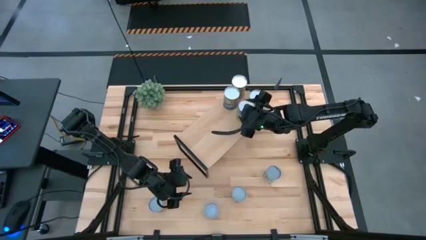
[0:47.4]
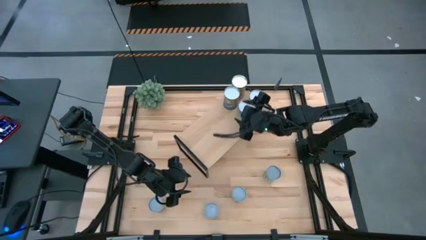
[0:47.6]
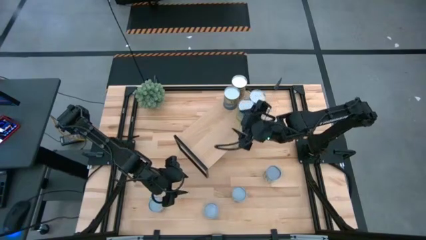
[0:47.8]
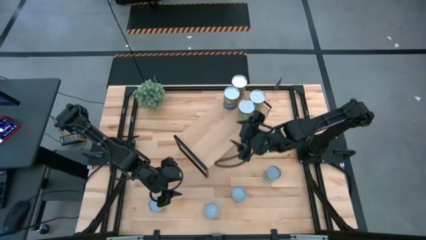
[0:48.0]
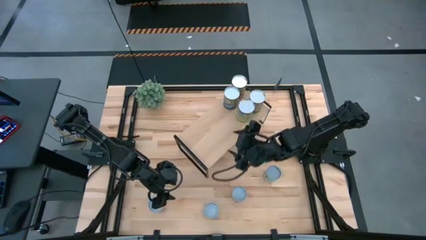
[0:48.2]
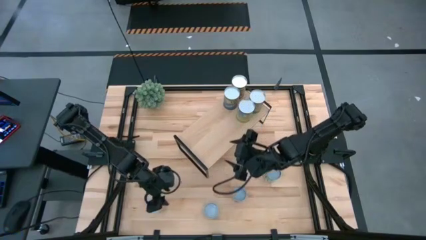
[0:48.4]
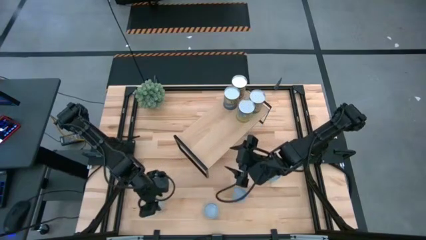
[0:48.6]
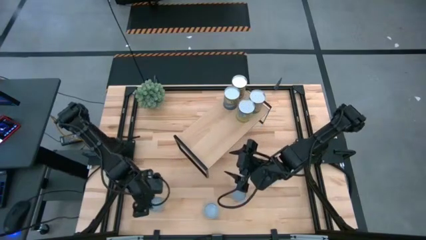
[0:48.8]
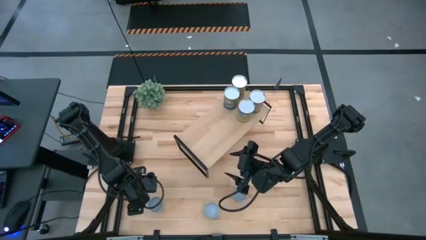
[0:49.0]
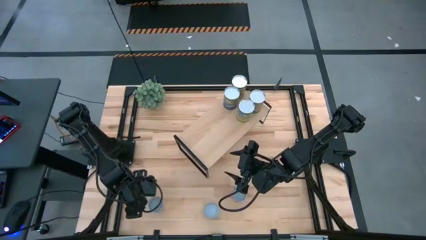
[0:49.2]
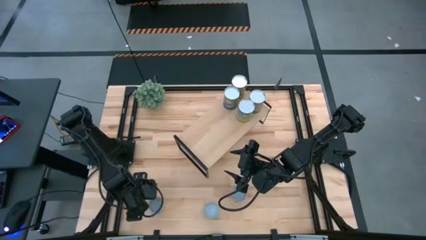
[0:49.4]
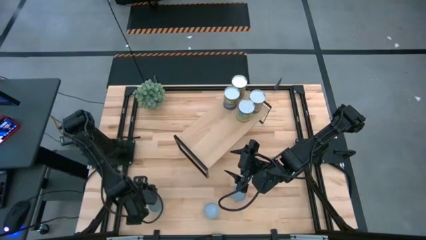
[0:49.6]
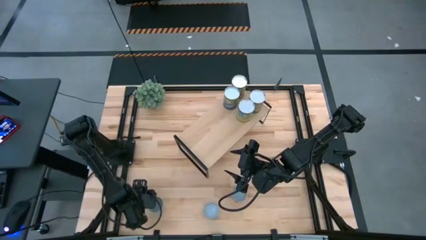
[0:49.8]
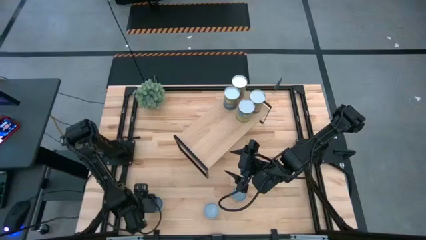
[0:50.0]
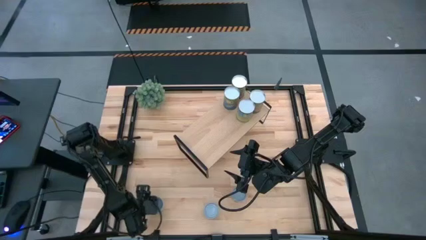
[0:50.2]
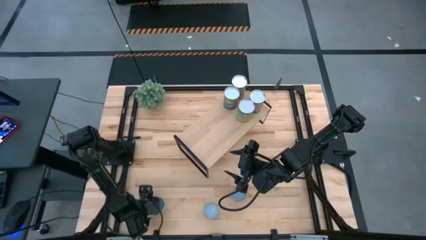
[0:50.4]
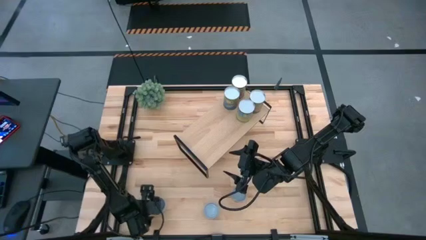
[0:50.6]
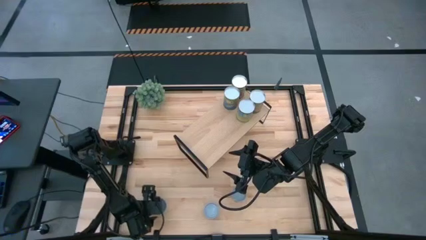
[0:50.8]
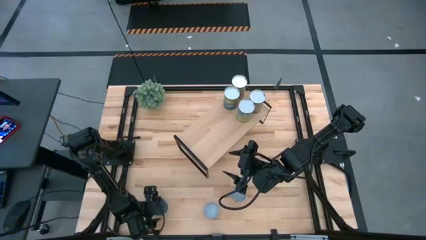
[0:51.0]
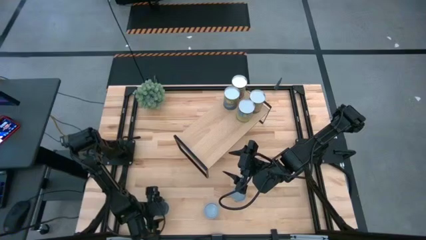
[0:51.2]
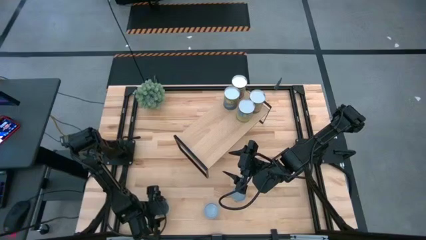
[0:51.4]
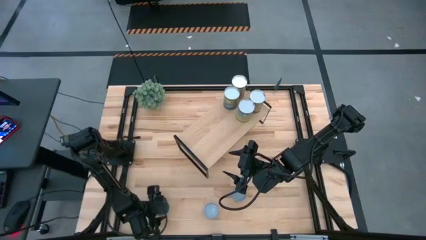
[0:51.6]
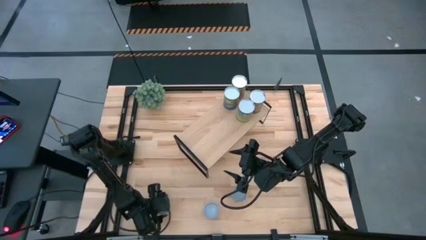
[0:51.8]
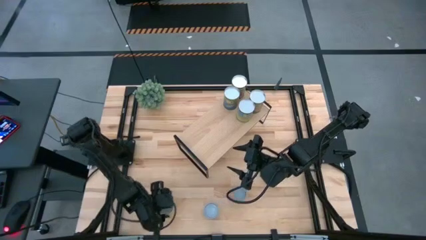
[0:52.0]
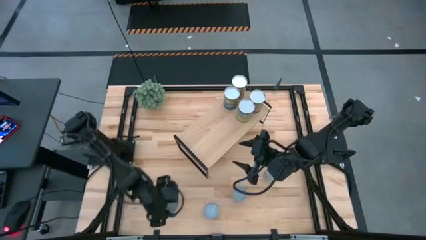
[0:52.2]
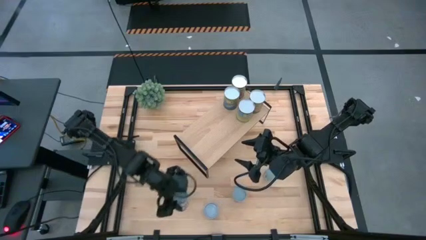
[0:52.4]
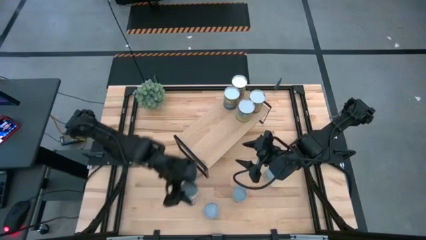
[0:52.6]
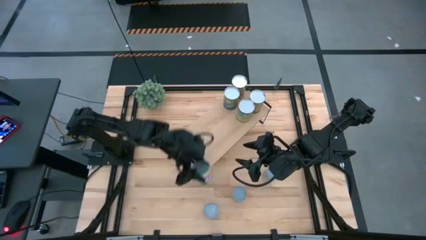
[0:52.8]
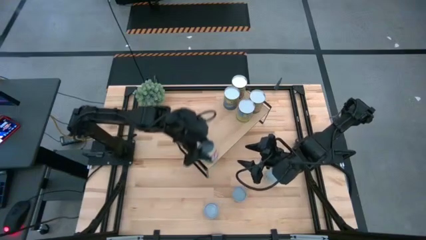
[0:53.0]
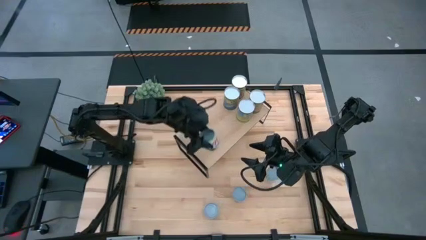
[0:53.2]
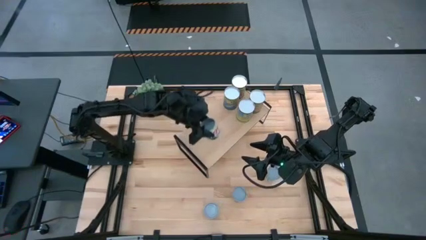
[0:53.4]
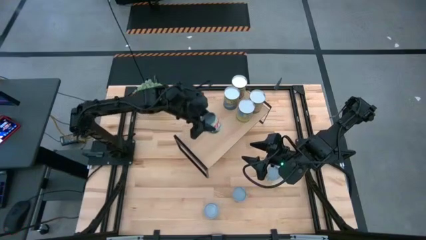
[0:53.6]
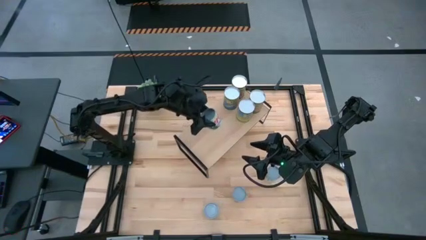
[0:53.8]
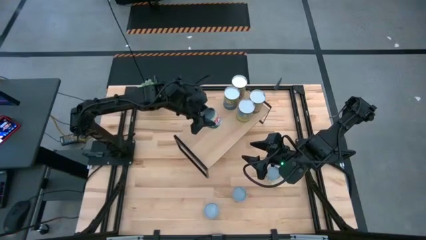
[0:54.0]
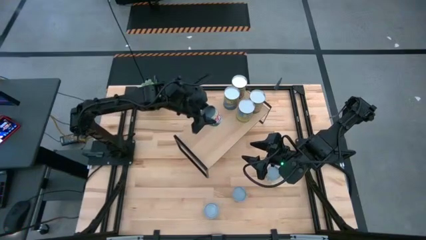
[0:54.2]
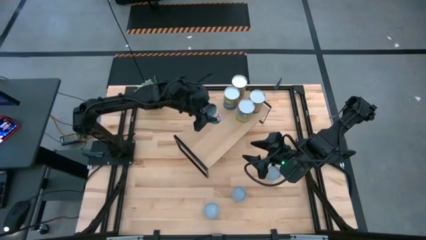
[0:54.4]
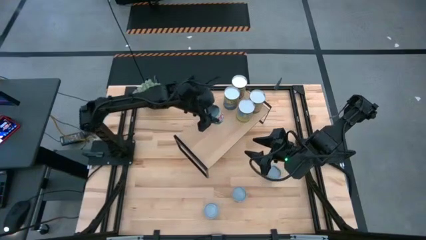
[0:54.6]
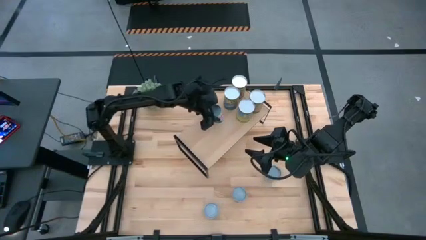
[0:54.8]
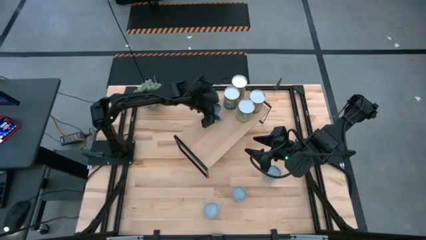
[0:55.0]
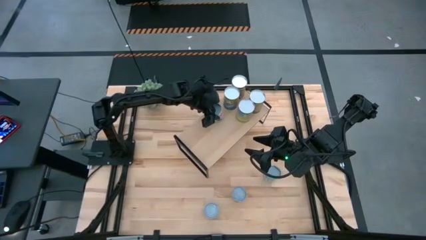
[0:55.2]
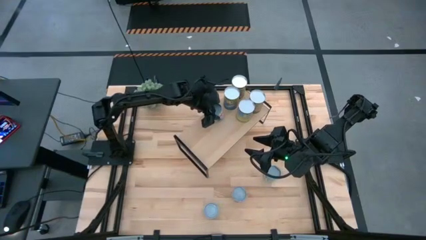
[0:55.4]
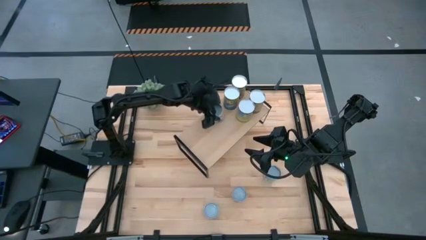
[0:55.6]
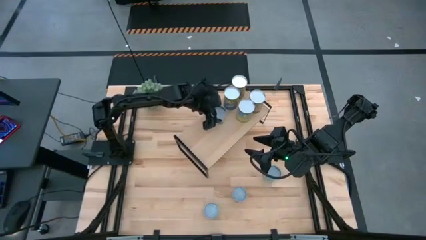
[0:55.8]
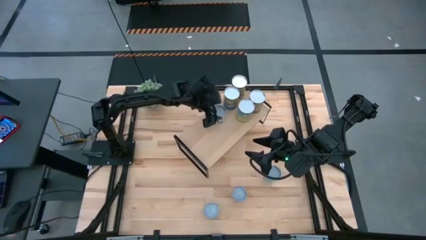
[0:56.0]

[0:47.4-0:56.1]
Task: Pick and place cans onto a shelf
Put the small canned peas can on the shelf

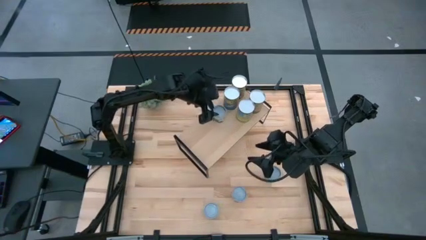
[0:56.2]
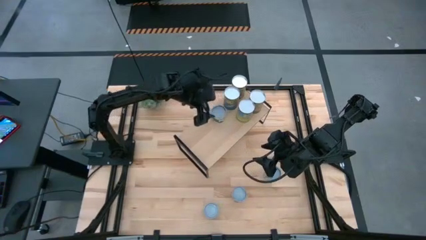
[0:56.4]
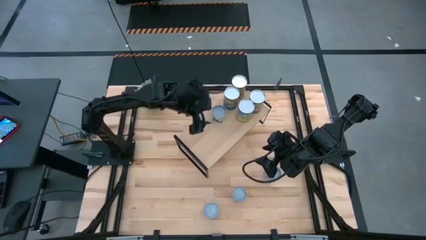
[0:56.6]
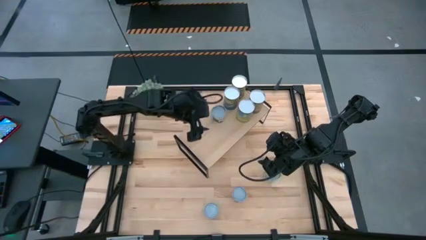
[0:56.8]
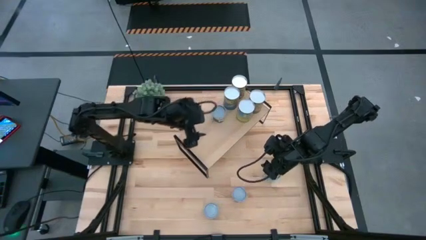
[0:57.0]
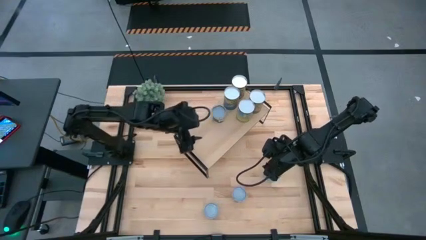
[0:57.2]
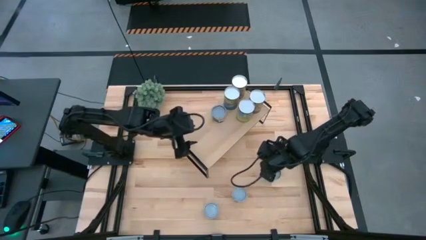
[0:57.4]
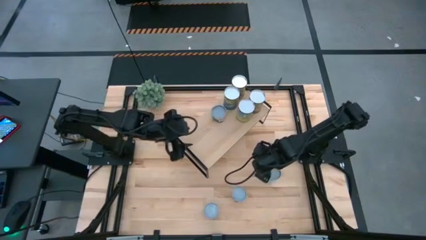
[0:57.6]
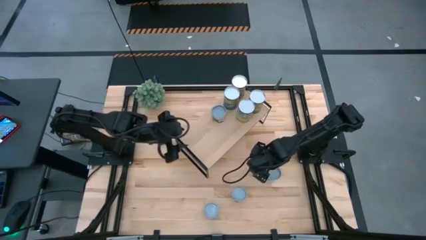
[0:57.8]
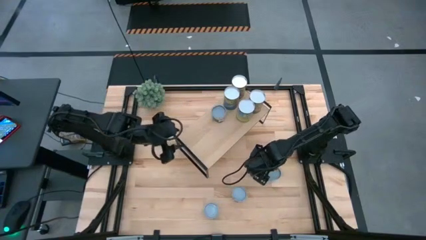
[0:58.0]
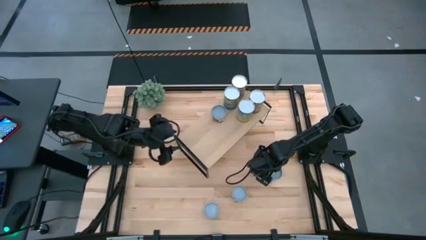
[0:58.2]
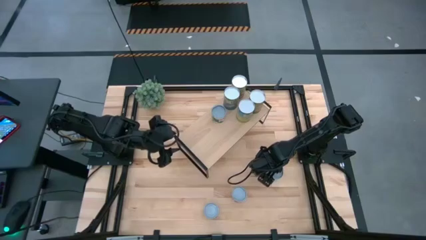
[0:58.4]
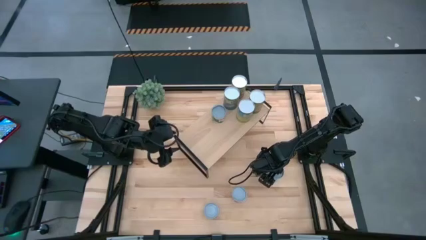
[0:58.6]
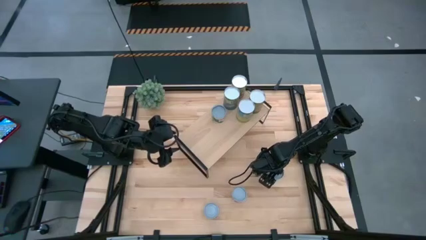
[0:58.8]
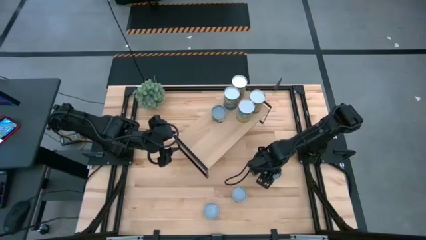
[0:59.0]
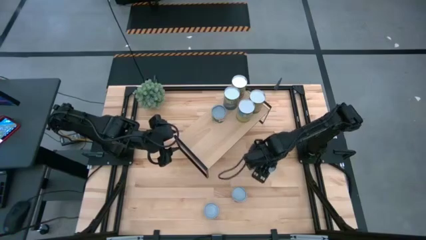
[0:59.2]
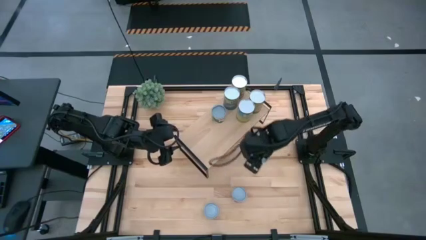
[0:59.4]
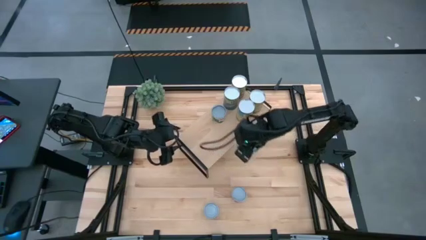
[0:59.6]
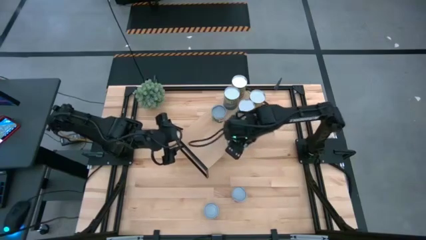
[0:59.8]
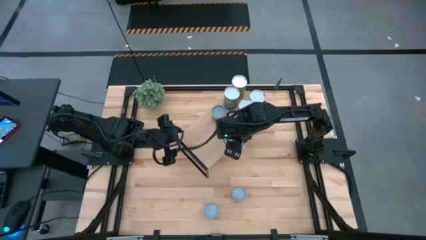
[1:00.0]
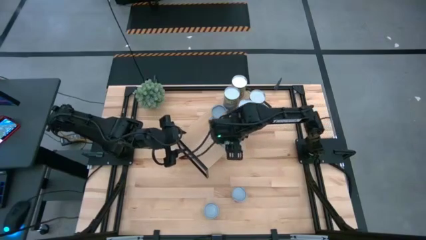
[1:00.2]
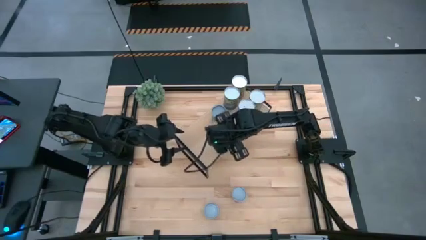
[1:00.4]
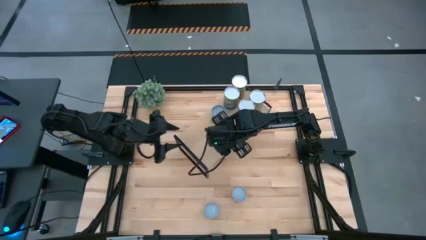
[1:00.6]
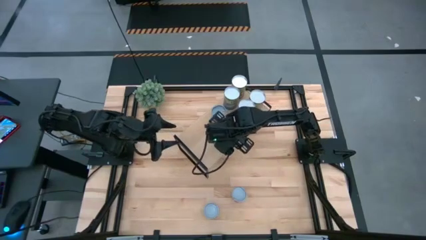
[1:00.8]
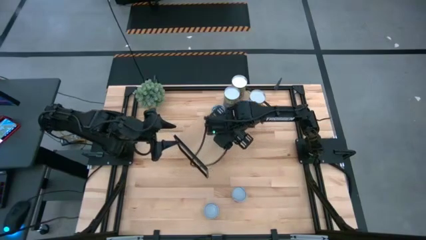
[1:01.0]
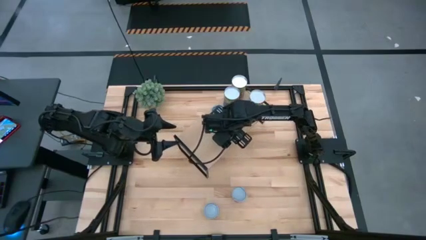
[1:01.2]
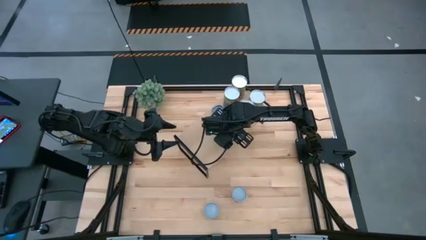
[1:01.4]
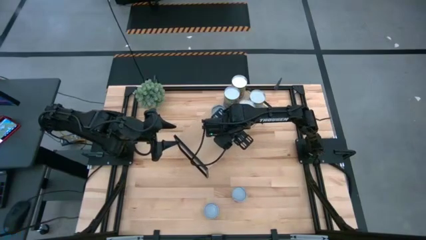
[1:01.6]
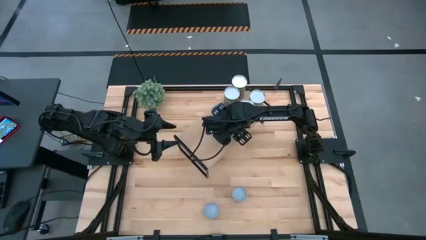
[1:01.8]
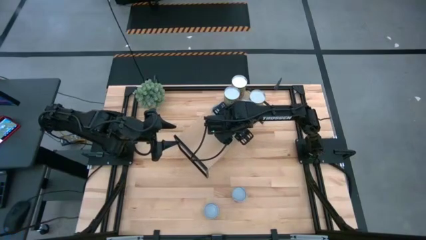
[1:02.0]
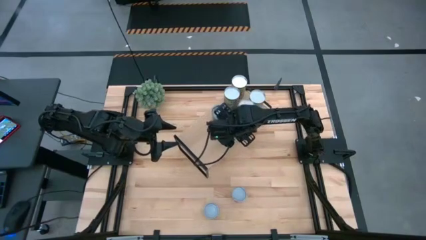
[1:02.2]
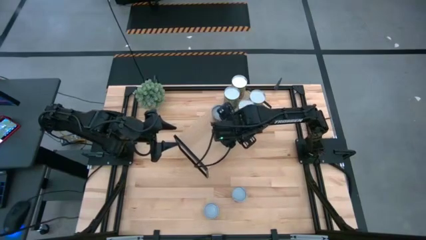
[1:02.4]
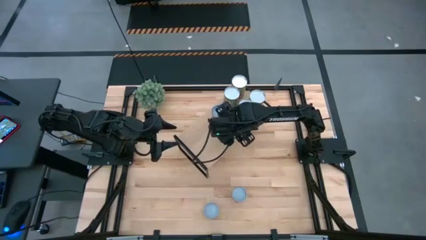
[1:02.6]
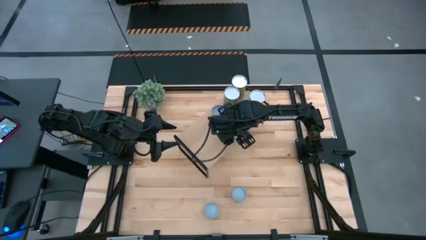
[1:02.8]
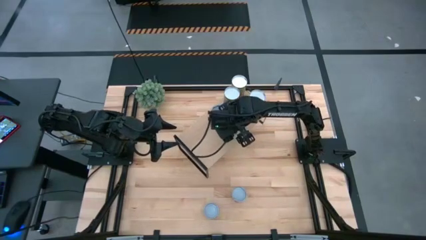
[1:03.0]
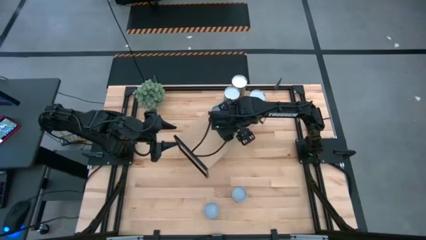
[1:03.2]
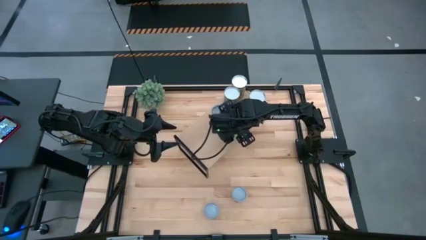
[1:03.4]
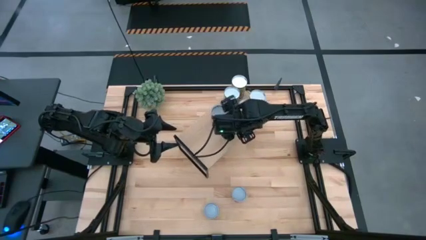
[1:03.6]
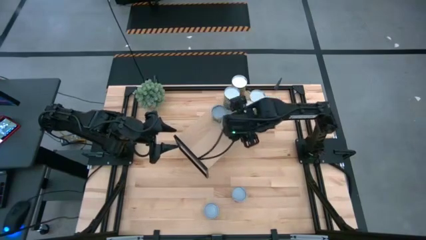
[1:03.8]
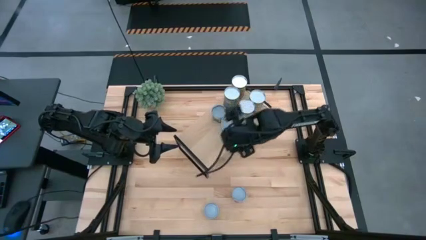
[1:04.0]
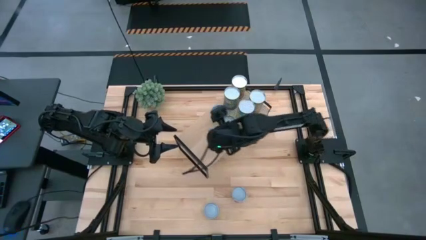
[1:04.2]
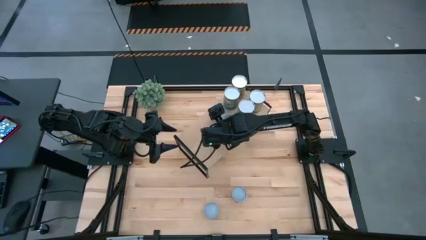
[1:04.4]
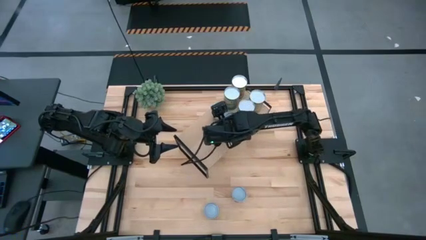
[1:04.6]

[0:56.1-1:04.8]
Put the canned mixed vegetables on the shelf
